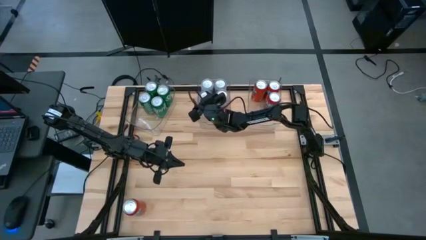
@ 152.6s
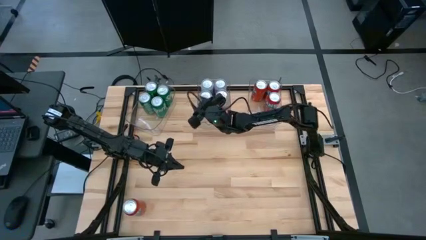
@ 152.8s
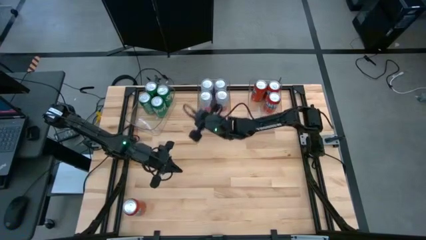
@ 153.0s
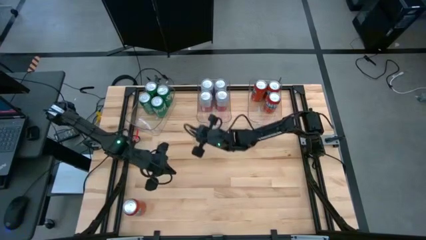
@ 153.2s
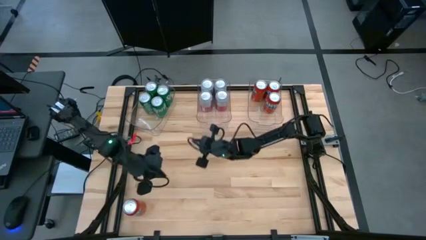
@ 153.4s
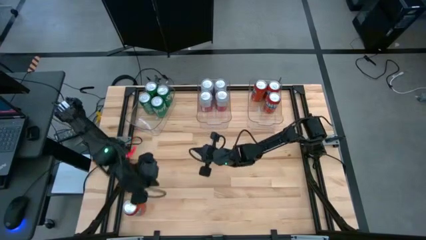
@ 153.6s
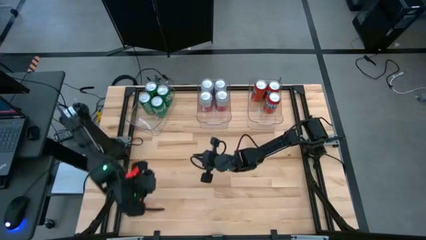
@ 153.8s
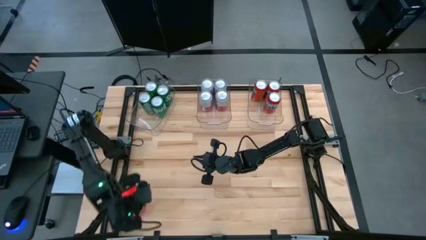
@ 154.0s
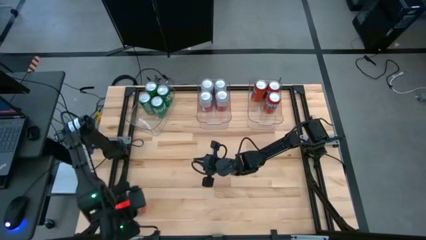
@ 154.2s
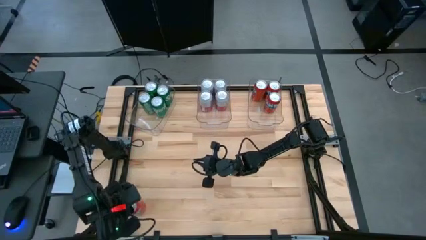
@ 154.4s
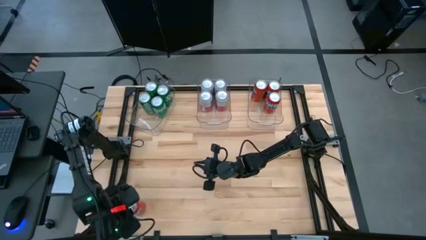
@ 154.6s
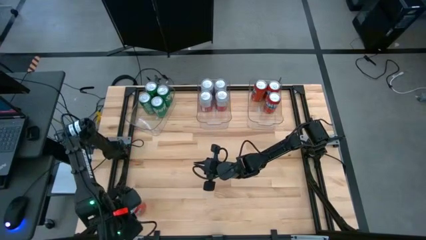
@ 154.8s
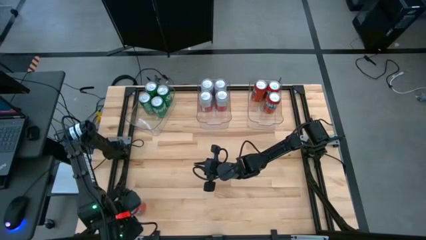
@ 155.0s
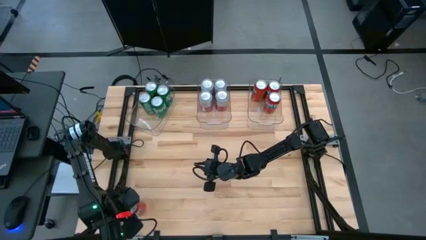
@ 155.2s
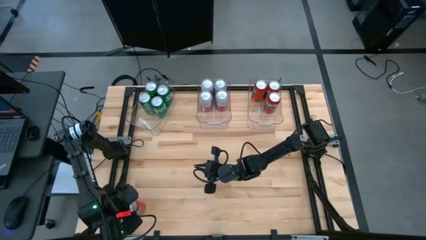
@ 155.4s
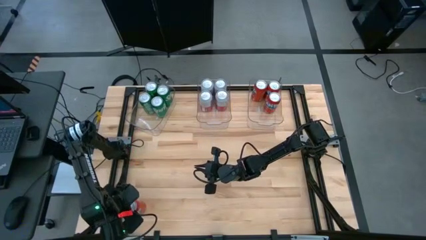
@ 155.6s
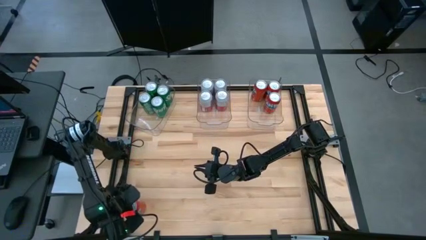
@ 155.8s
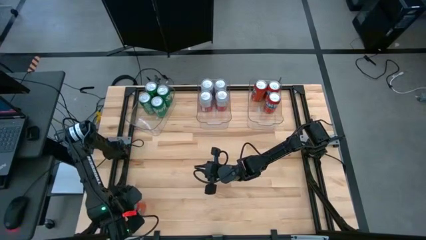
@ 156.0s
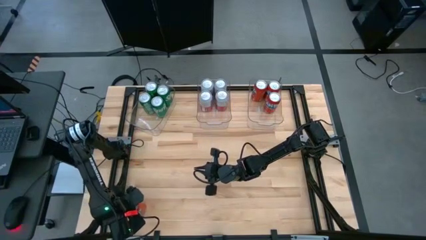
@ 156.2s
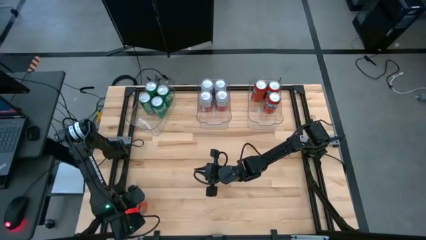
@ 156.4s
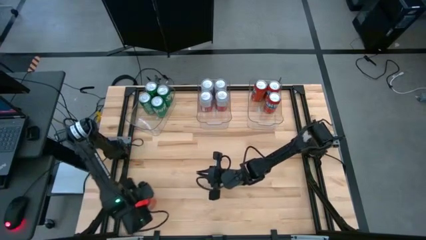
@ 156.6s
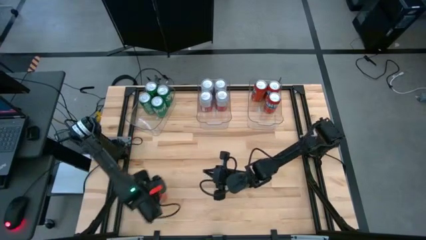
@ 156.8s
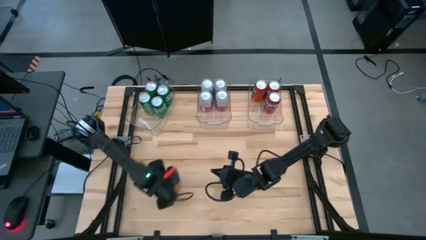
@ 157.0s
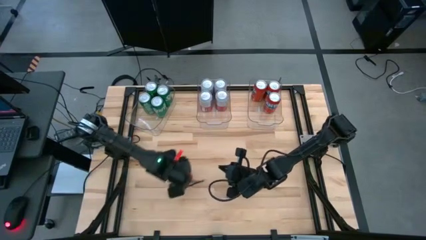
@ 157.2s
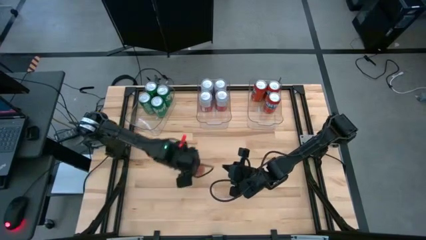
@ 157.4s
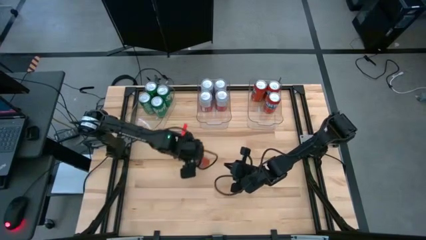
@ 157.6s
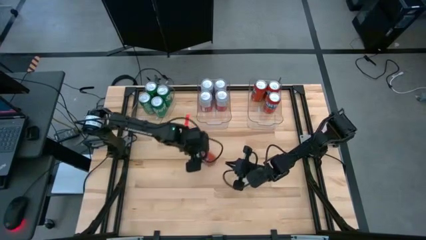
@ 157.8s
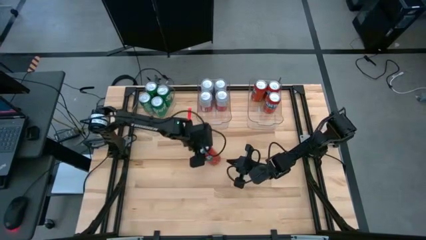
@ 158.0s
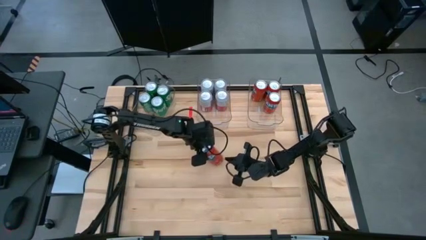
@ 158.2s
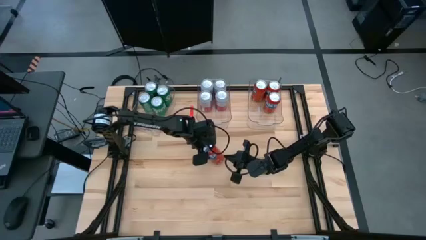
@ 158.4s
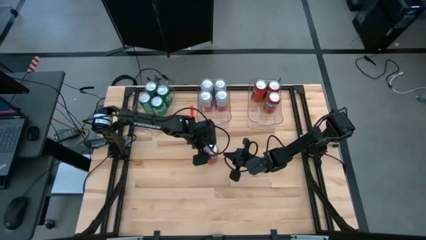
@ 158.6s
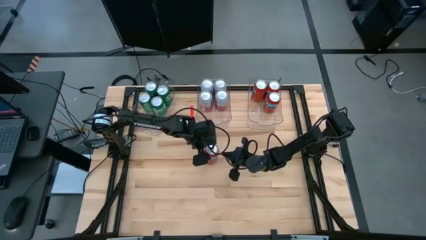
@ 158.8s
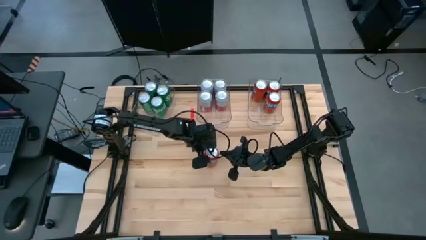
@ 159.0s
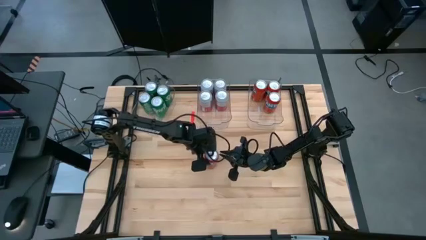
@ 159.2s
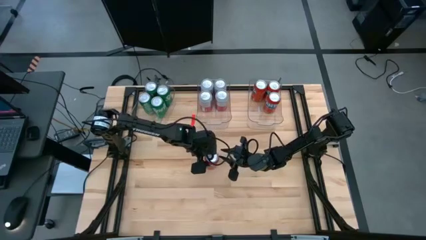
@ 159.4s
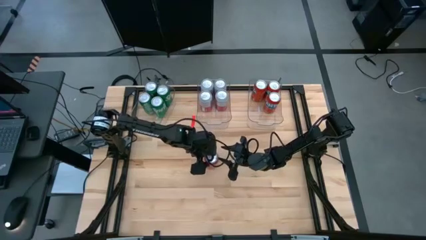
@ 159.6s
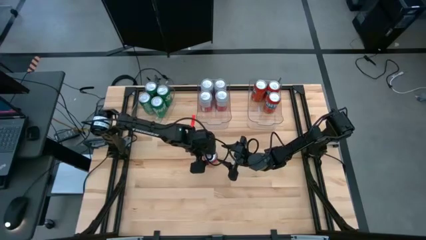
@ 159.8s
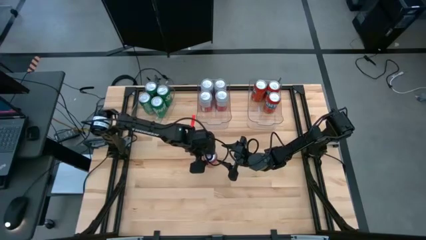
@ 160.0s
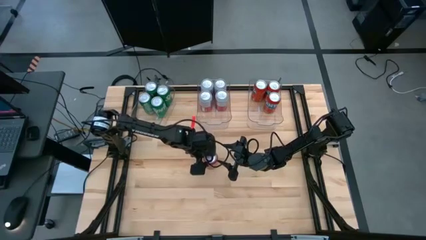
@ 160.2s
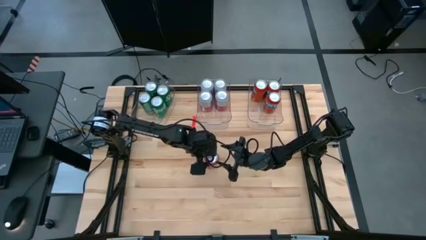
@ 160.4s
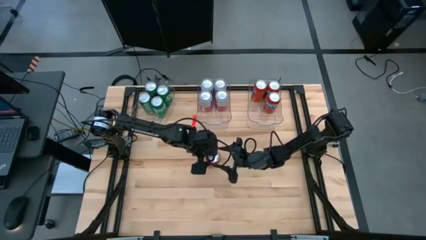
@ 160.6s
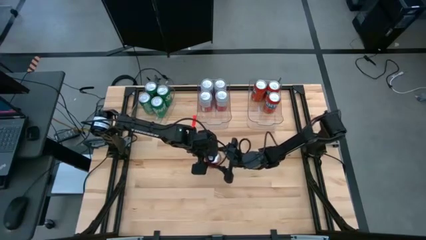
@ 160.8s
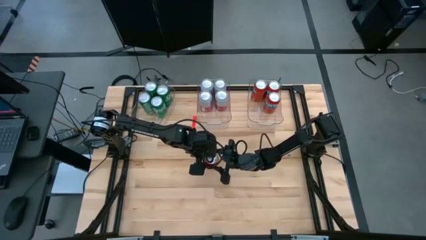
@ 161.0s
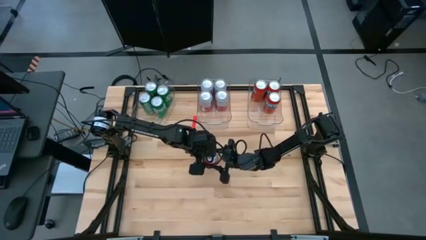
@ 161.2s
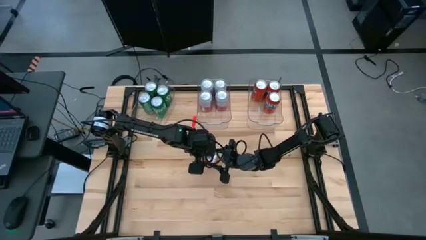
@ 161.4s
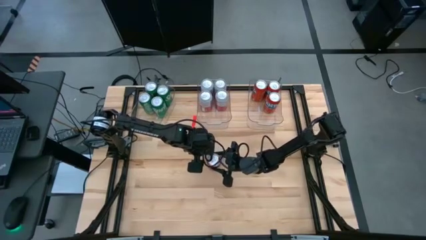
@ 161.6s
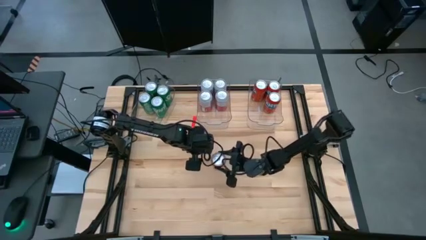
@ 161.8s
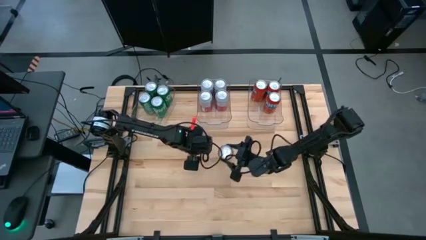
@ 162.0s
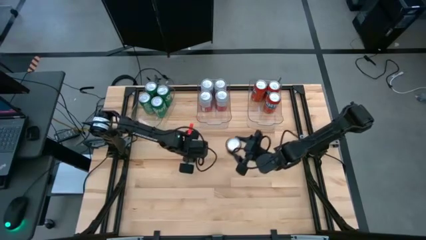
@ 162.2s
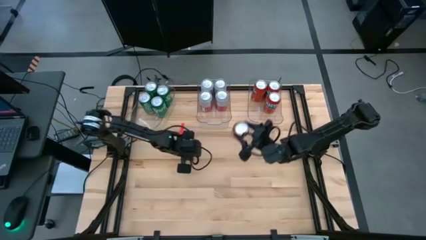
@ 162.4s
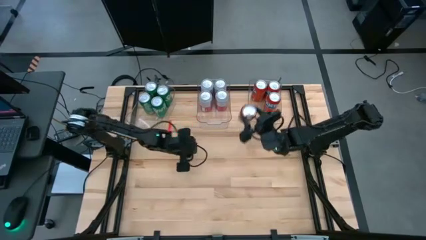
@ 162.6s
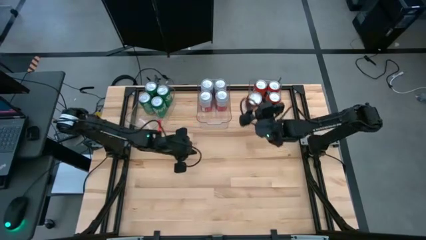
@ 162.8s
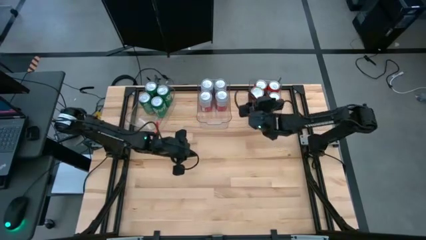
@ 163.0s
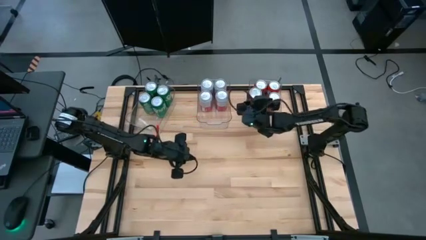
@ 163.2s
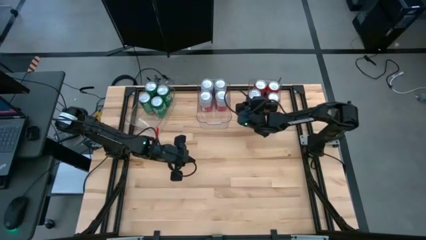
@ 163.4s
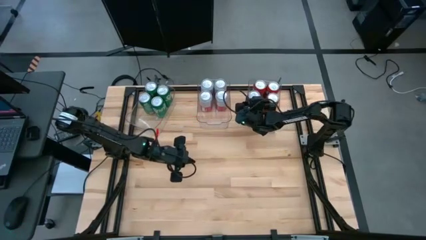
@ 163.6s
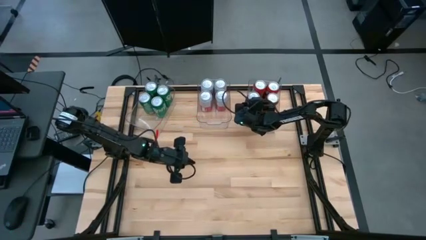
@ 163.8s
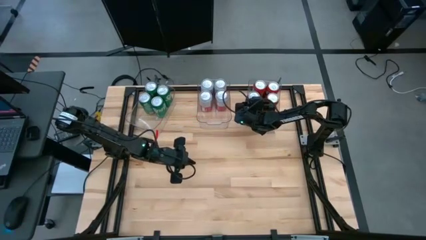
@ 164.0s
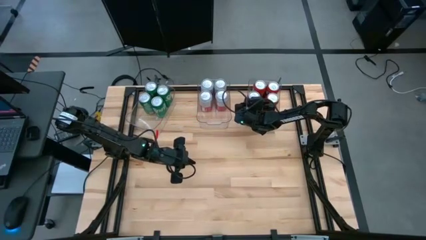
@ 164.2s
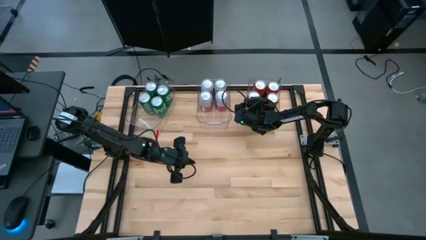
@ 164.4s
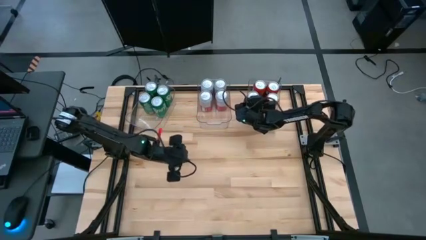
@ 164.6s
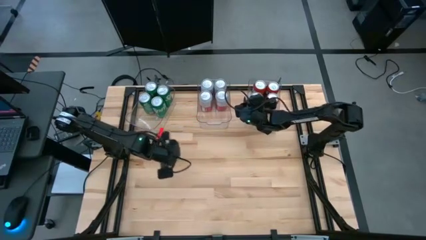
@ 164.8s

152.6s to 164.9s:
Task: Sort soda cans
Put the red soda can into the right transparent bin

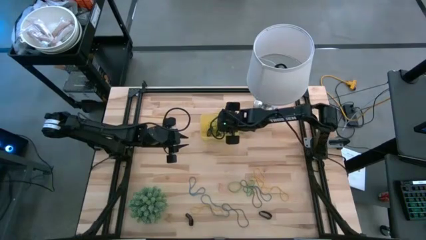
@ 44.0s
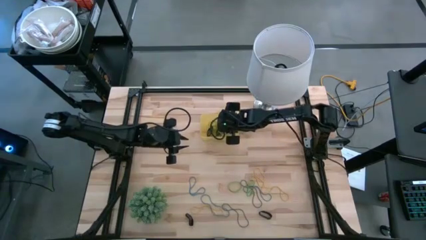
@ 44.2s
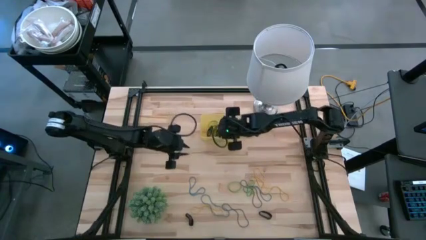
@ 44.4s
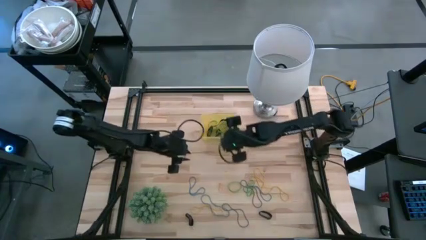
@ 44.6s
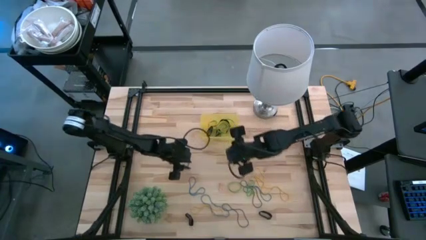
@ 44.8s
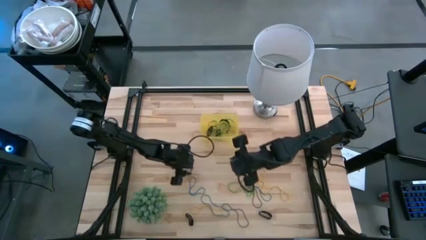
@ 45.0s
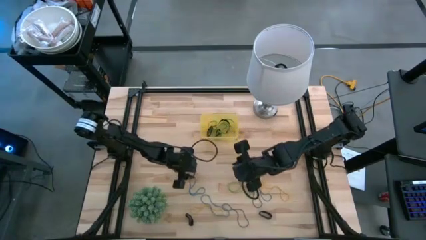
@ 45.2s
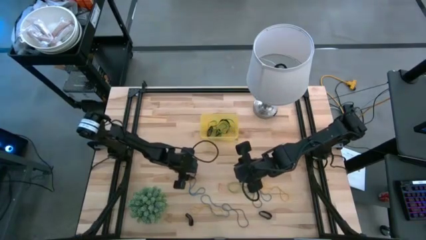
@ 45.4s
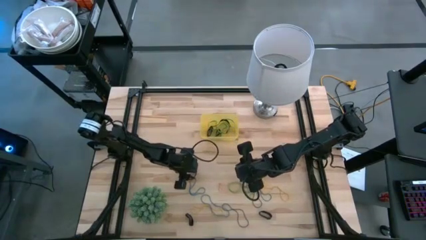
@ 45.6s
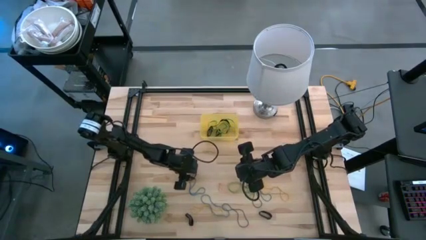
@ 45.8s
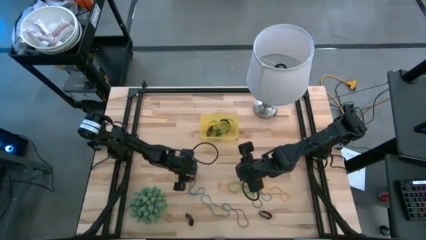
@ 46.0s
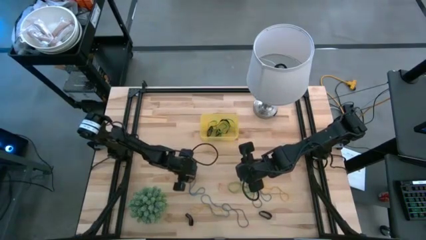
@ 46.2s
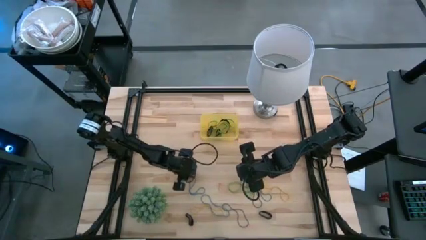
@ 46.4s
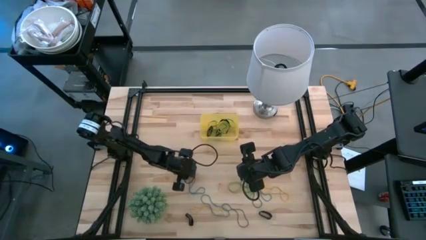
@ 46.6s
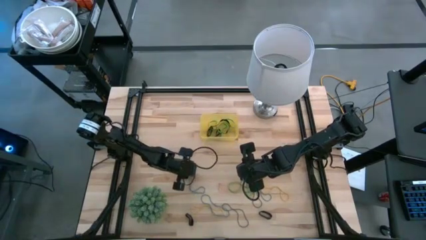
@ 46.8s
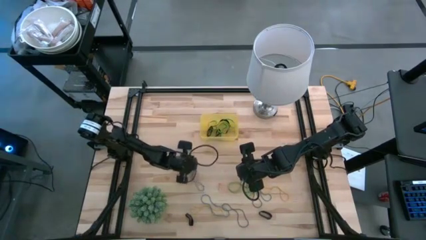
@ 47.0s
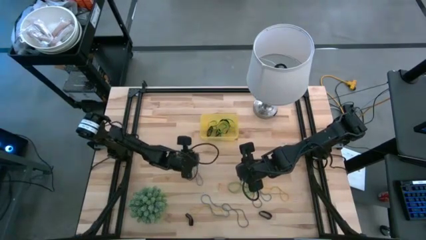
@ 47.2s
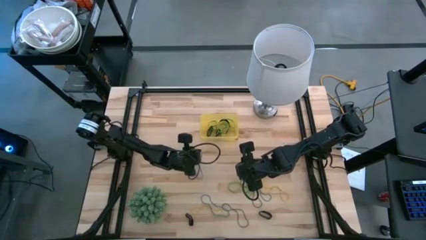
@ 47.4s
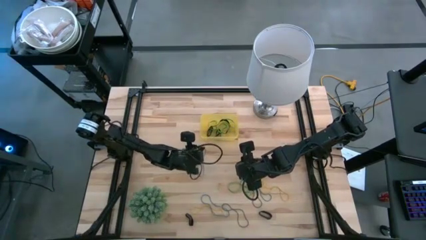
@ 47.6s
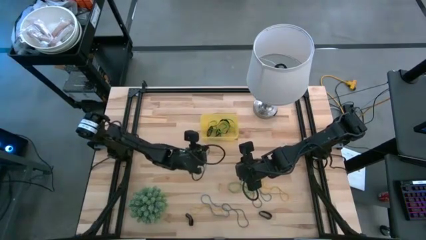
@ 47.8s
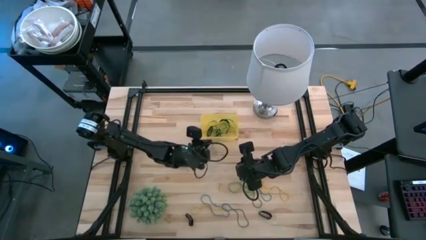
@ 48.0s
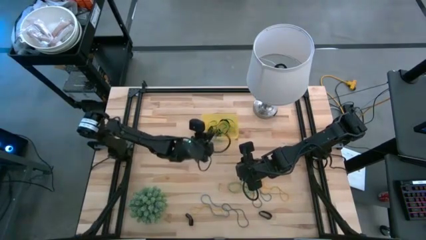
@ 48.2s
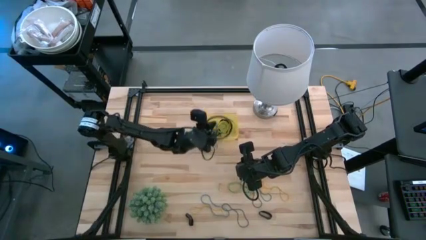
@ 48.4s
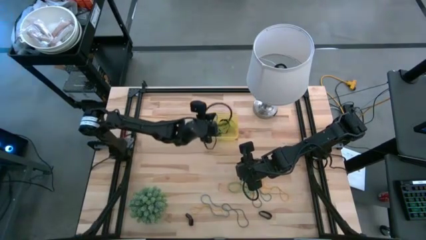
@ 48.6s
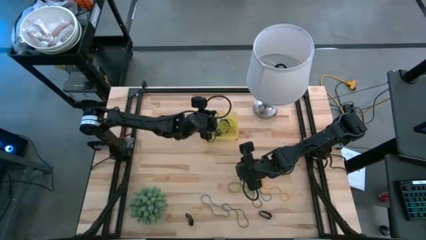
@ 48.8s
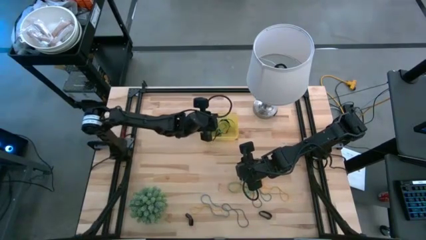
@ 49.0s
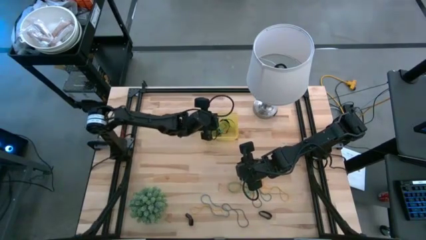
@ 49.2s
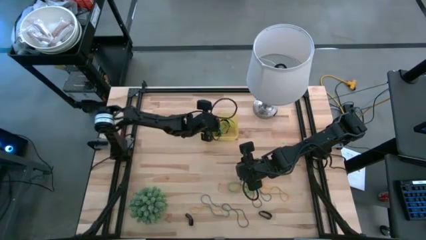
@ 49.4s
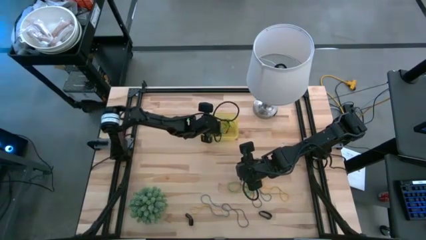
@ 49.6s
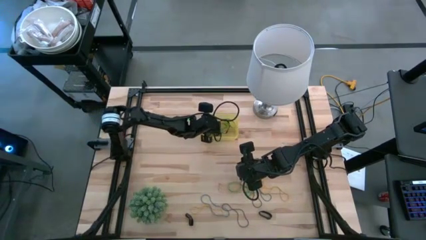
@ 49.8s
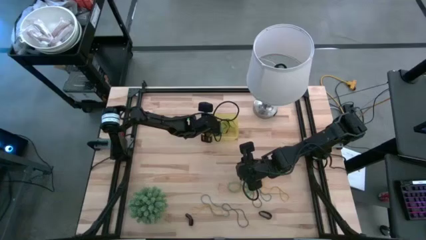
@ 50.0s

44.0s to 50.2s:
Task: Pick and place rubber bands into bin
Put the blue rubber band into the yellow bin
